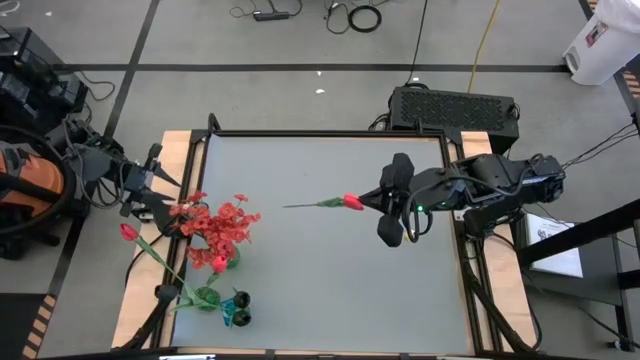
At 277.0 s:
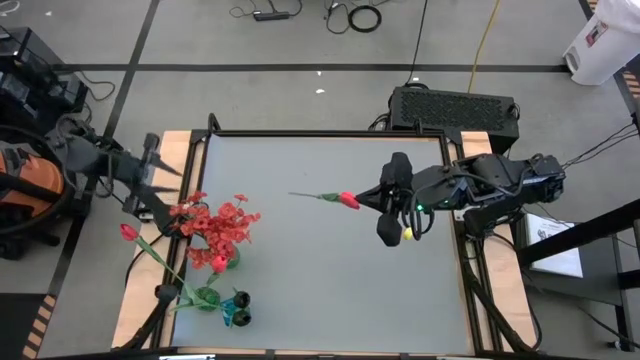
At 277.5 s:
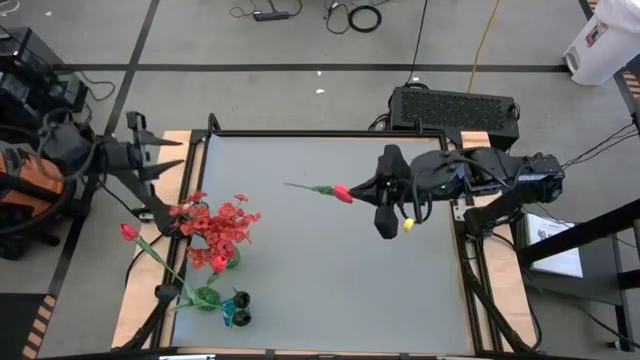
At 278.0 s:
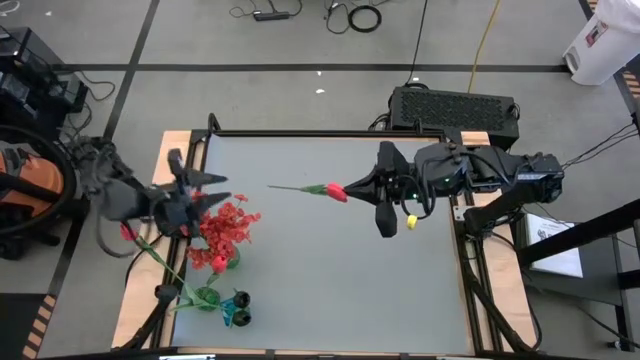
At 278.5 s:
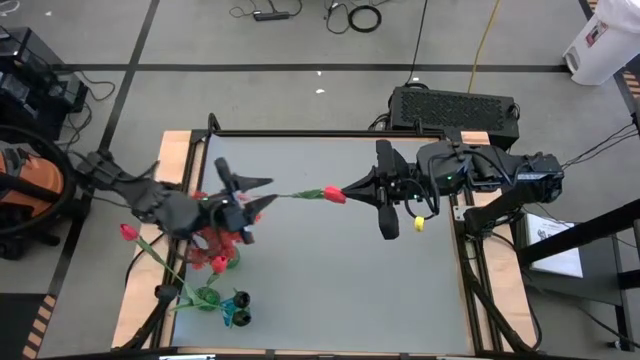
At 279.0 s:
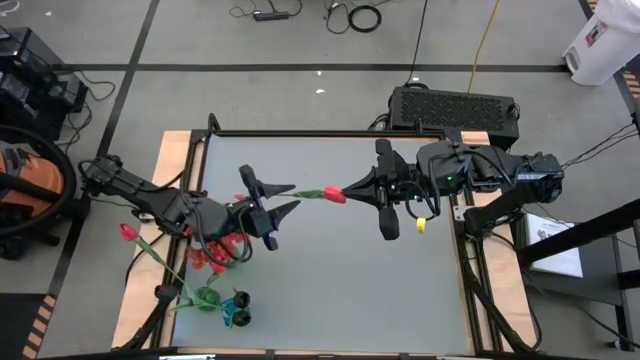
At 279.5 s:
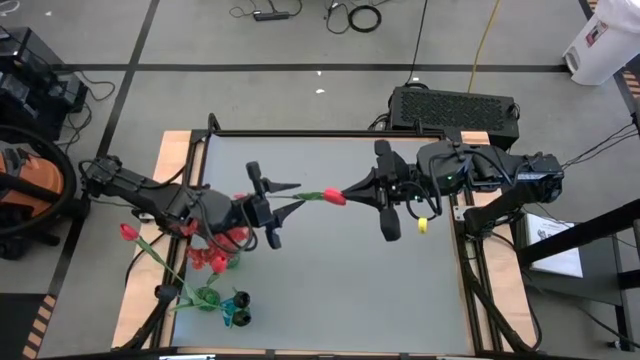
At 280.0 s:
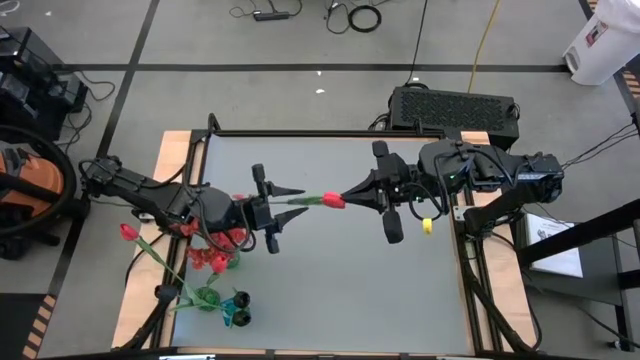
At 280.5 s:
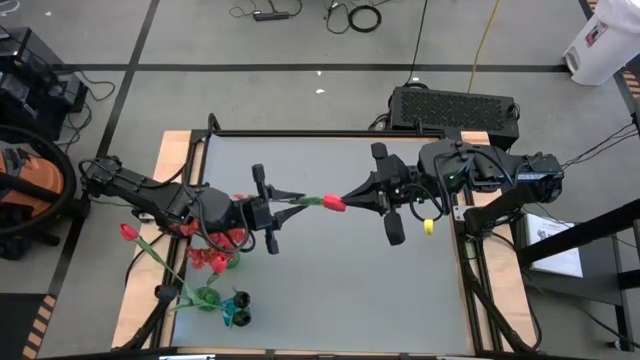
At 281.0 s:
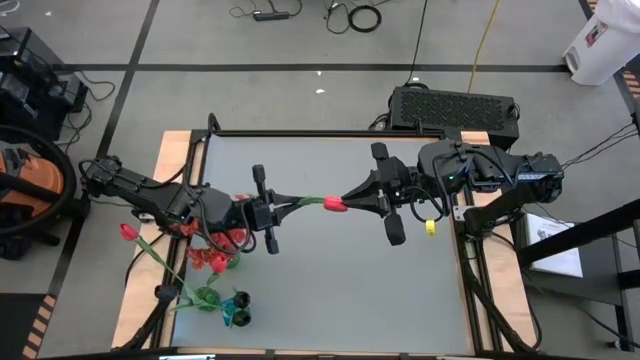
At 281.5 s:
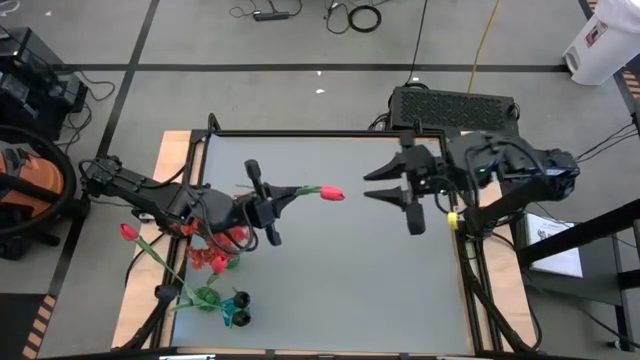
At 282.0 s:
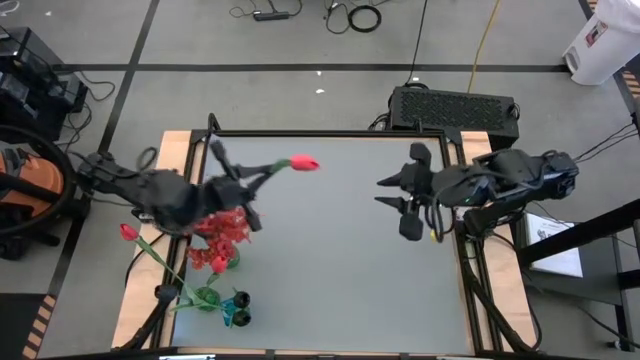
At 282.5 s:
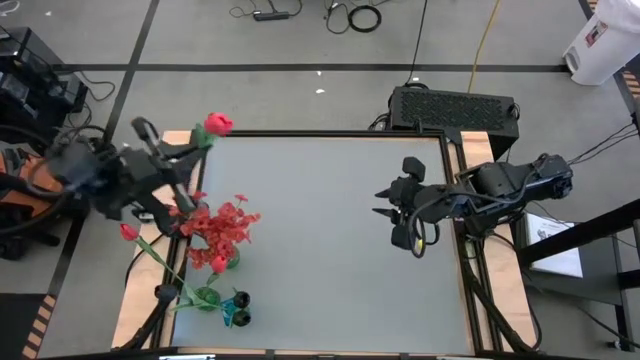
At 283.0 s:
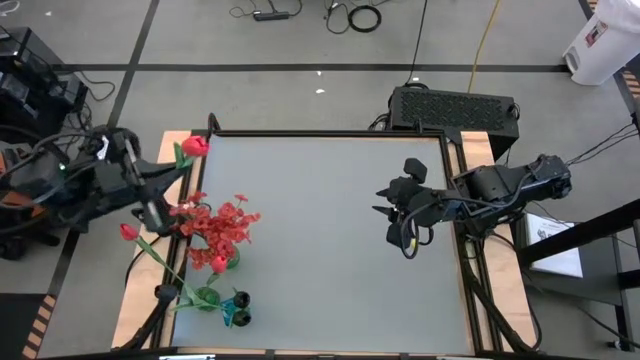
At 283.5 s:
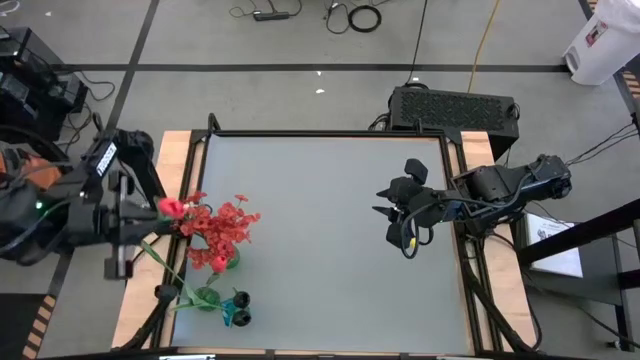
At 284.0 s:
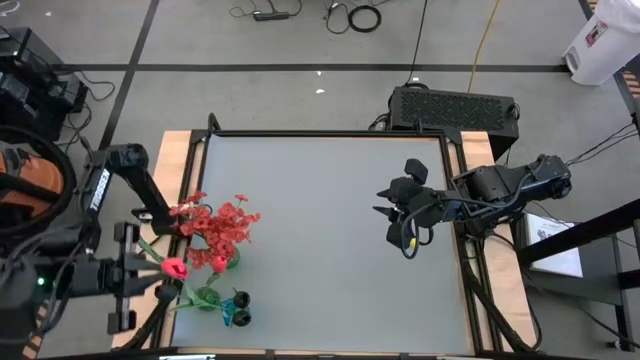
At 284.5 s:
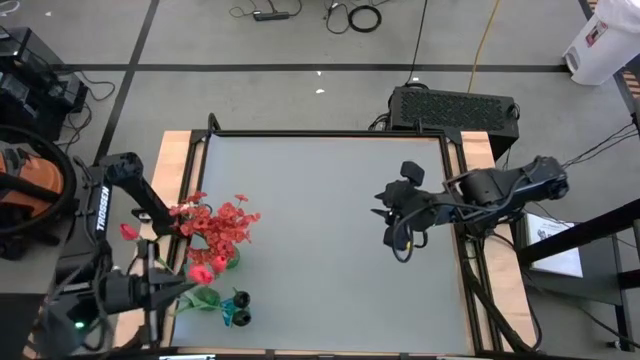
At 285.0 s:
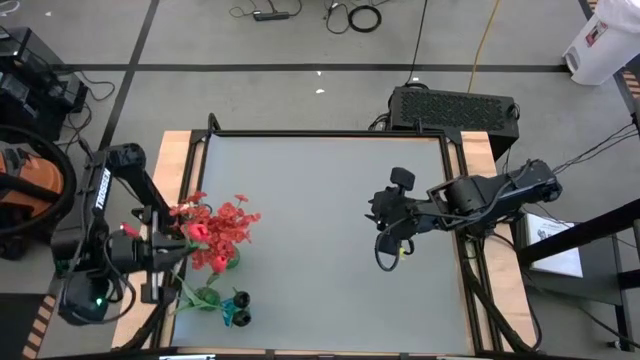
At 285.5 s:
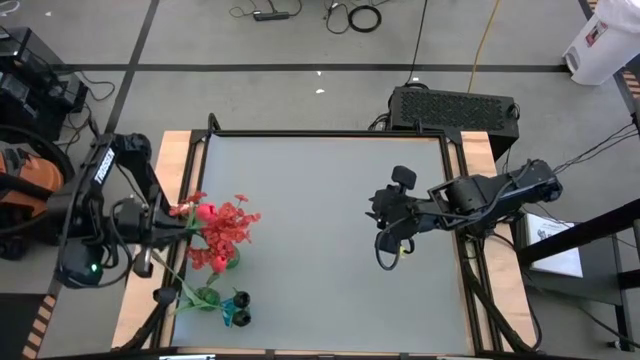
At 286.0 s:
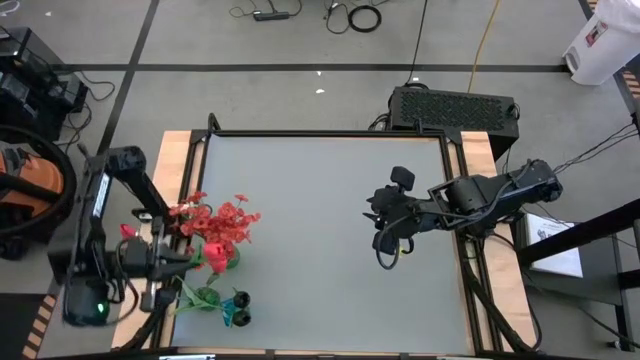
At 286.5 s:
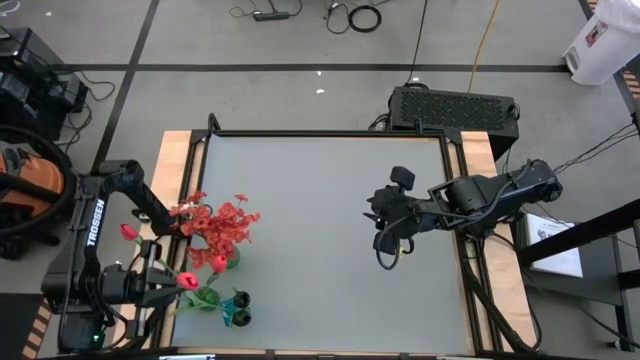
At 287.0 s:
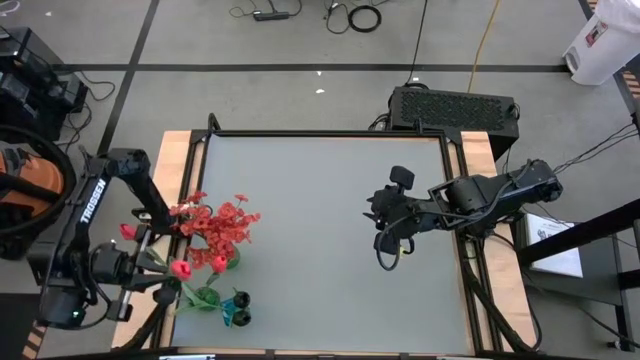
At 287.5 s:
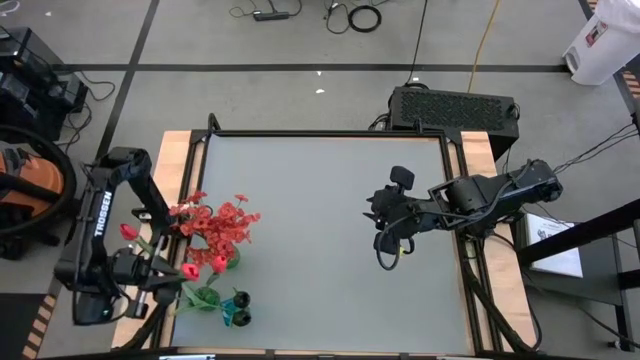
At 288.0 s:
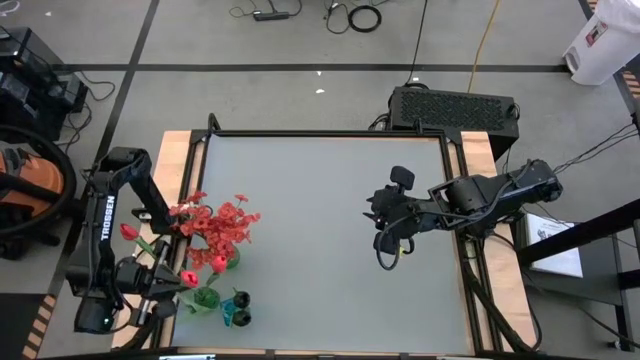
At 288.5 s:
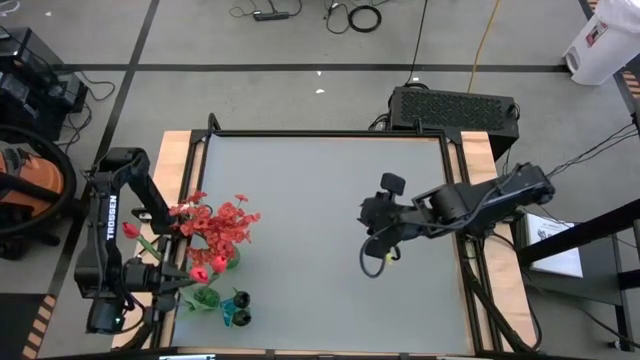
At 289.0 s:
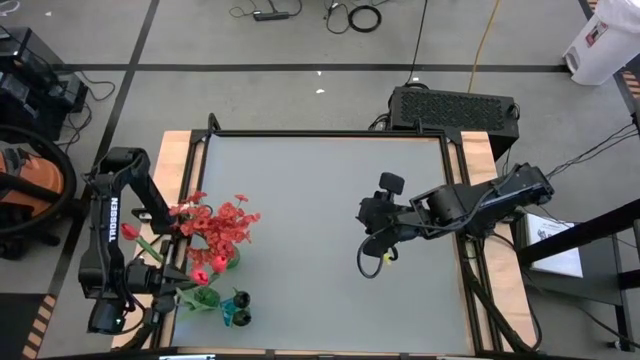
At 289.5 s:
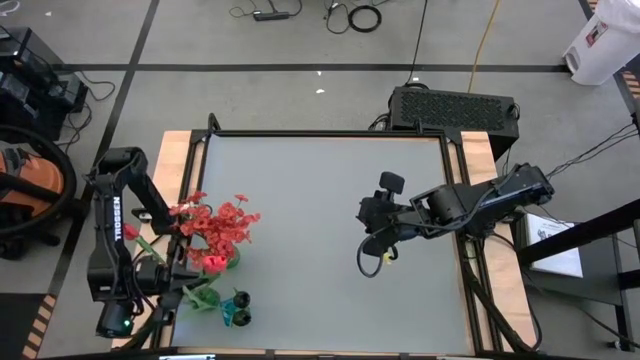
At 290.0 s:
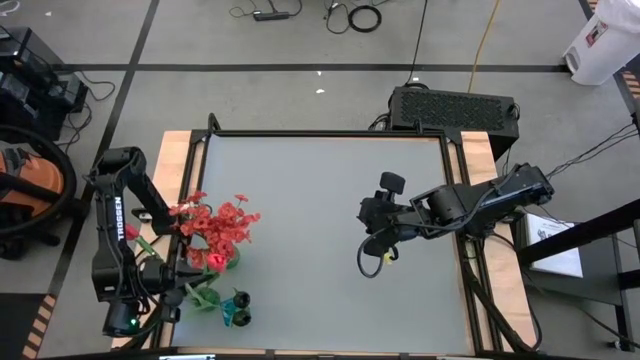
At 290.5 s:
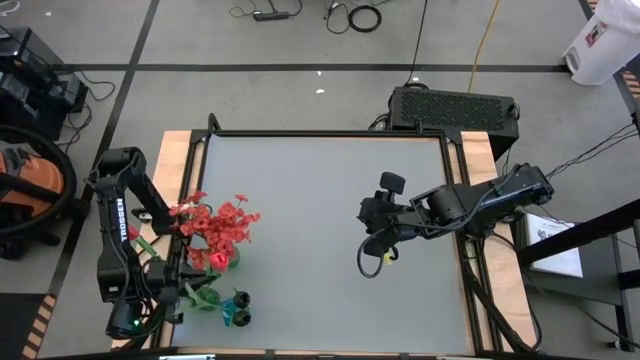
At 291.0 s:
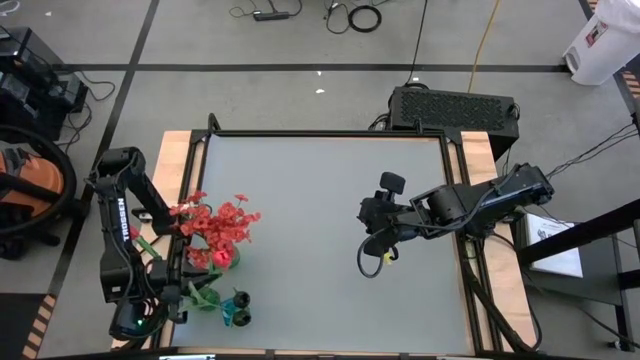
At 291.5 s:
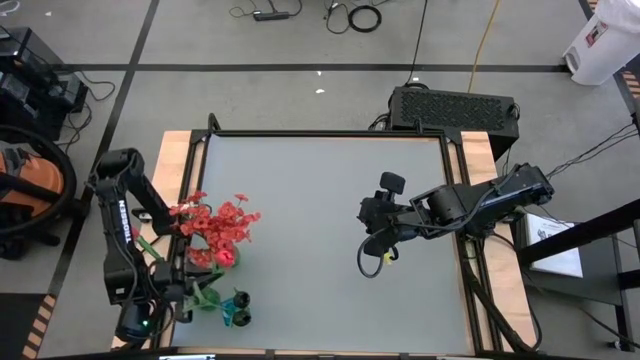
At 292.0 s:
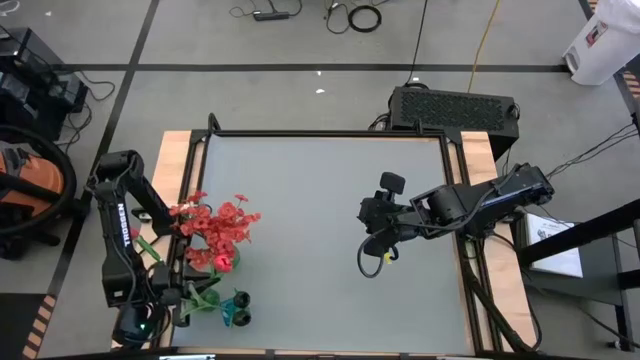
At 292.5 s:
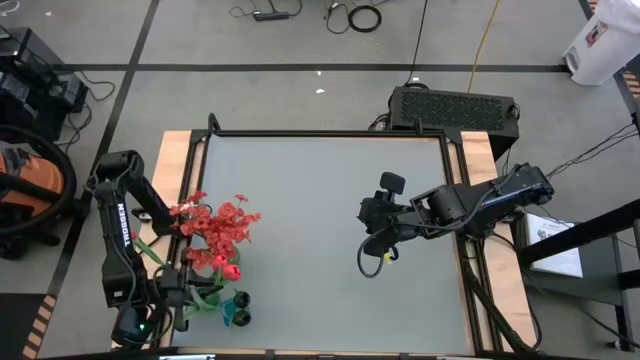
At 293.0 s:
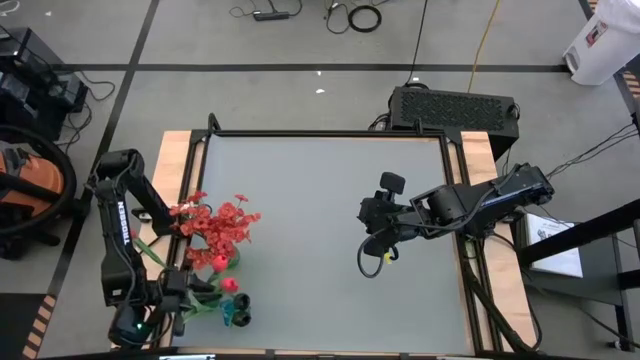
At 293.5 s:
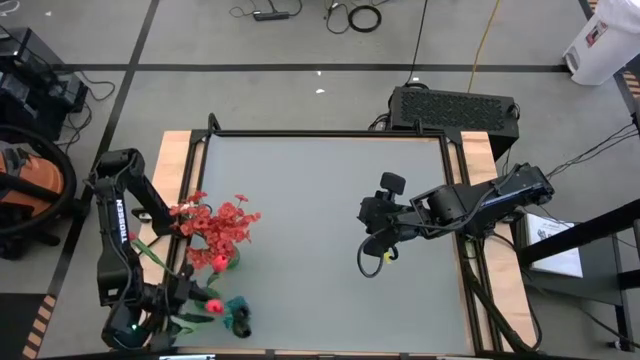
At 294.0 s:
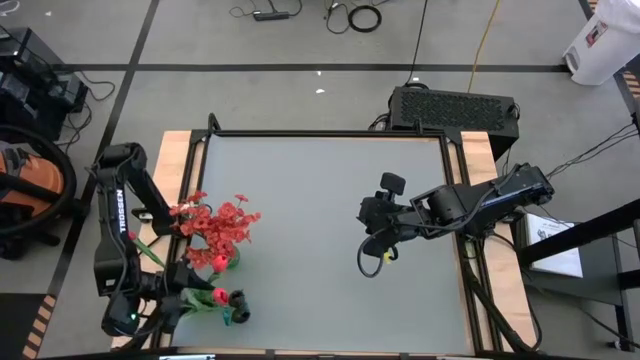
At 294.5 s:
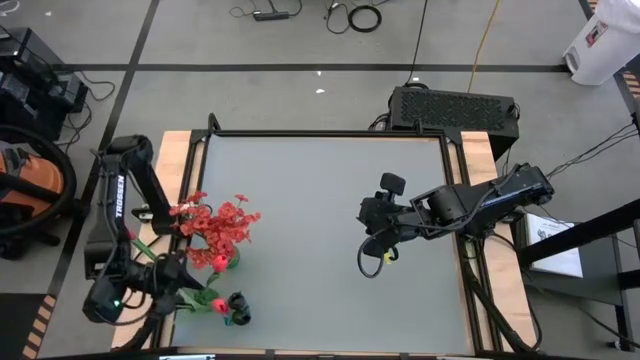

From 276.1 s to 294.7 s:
Task: Sort flowers into vase by color
Put the light orange flower into the bottom green vase

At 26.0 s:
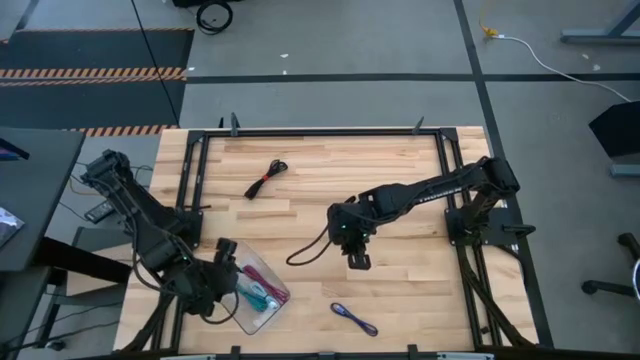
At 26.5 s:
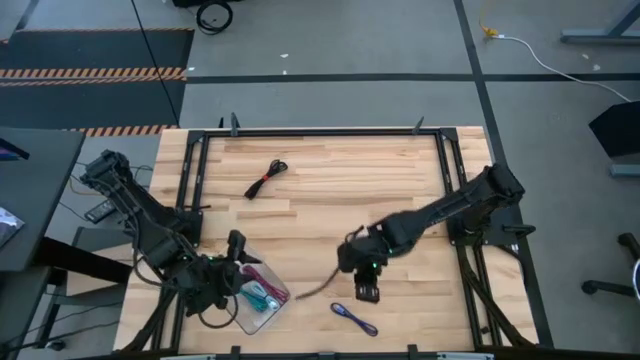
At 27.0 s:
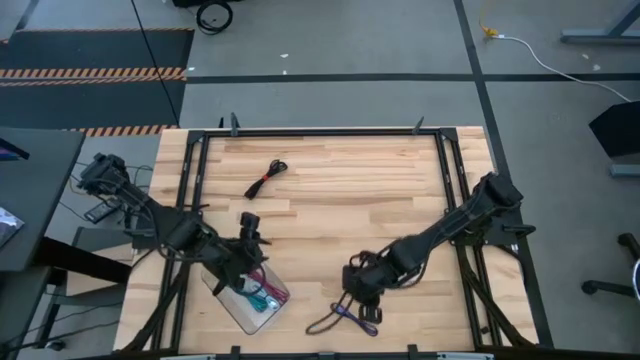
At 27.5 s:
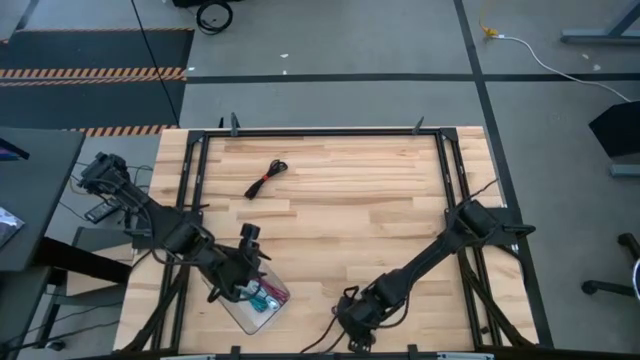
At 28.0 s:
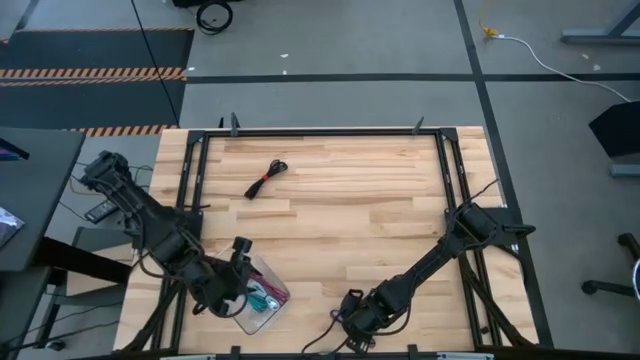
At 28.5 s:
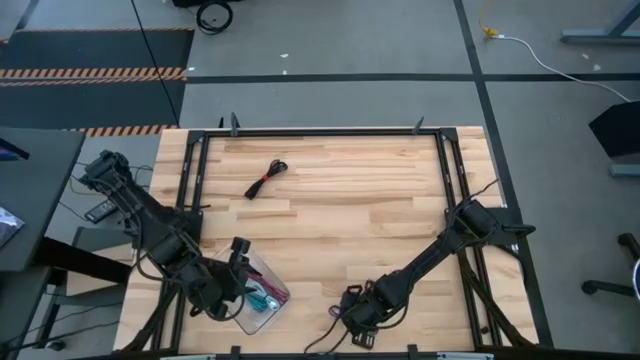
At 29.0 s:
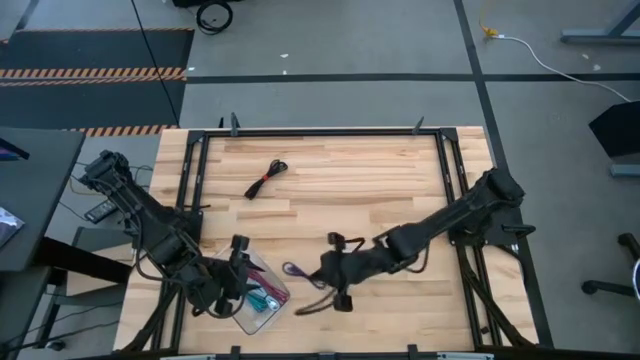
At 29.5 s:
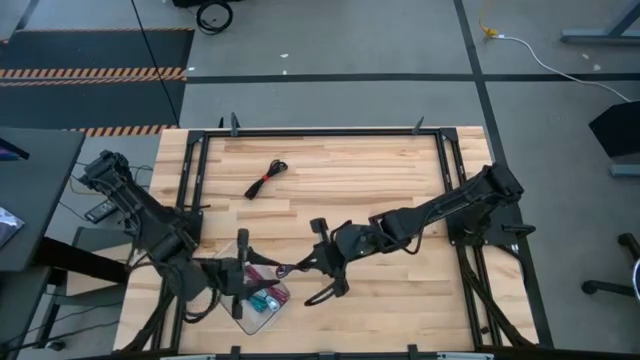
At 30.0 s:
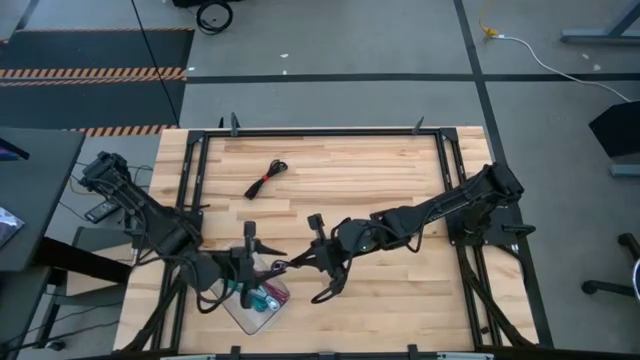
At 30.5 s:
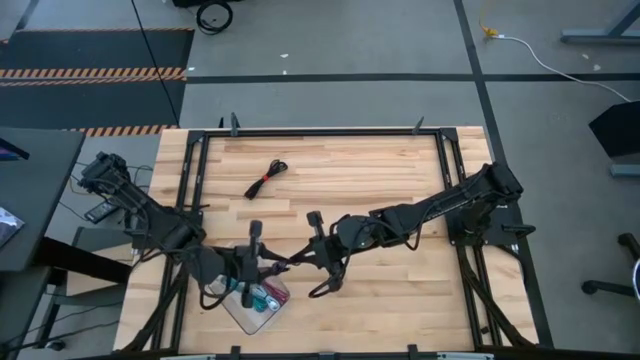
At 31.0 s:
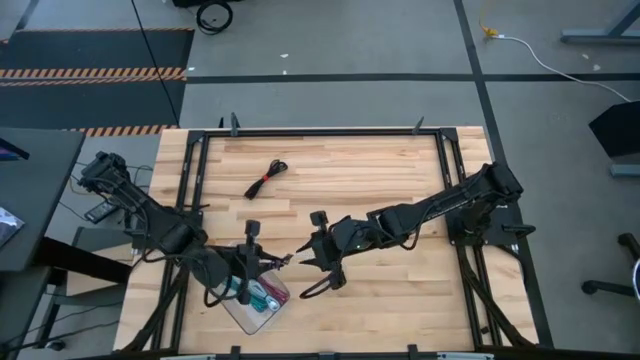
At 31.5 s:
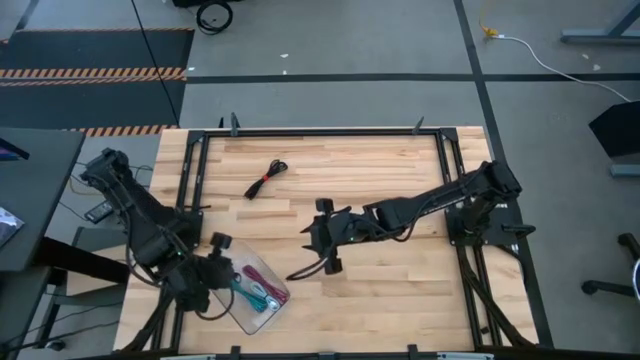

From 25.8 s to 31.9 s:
Task: Pick and place USB-C Cables
Put the black violet charger cable into the transparent bin
